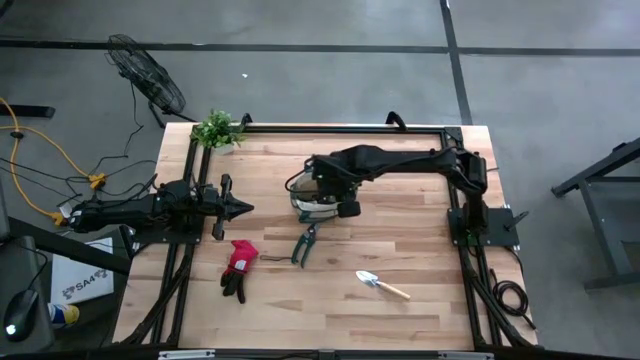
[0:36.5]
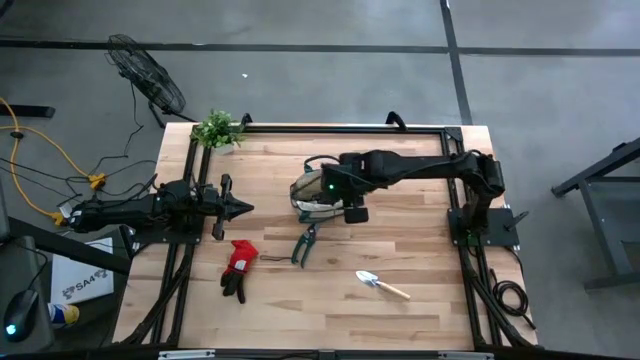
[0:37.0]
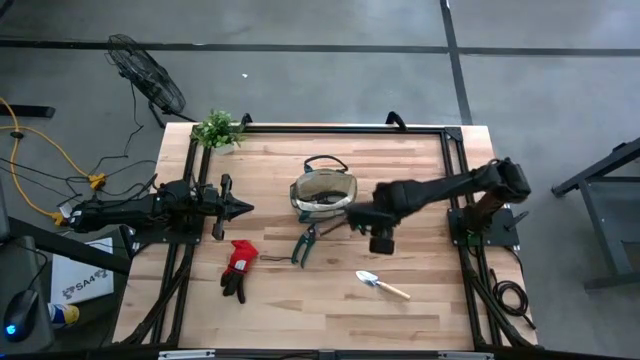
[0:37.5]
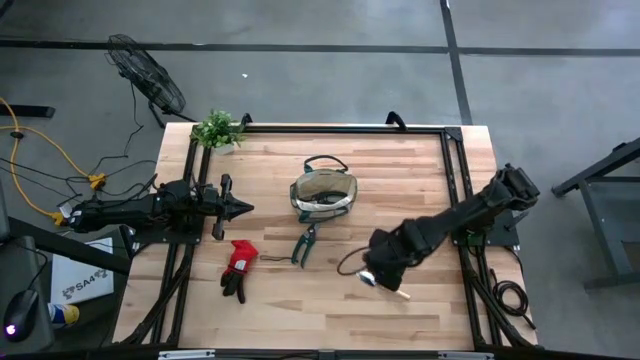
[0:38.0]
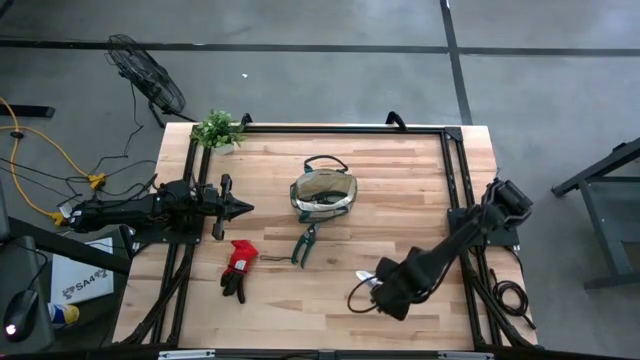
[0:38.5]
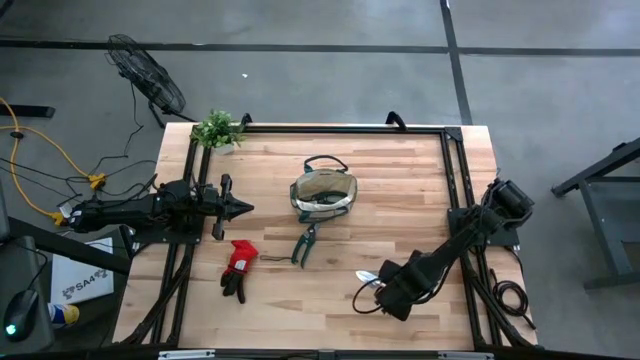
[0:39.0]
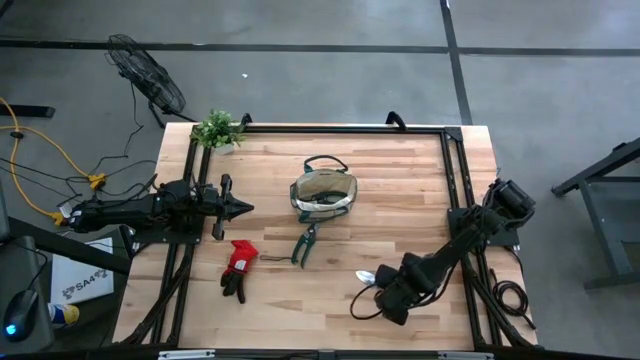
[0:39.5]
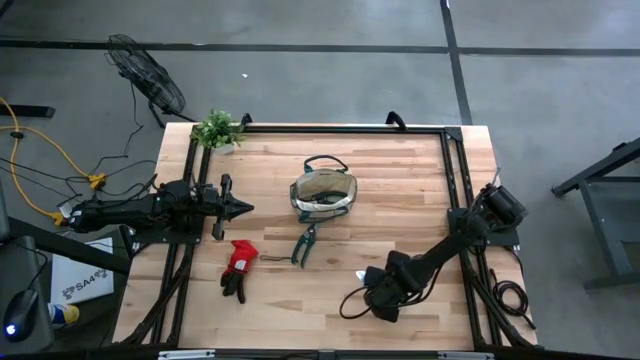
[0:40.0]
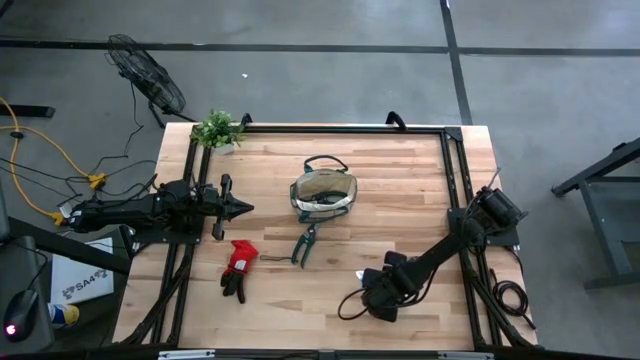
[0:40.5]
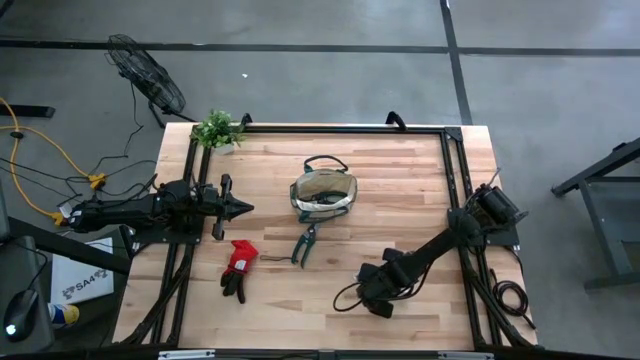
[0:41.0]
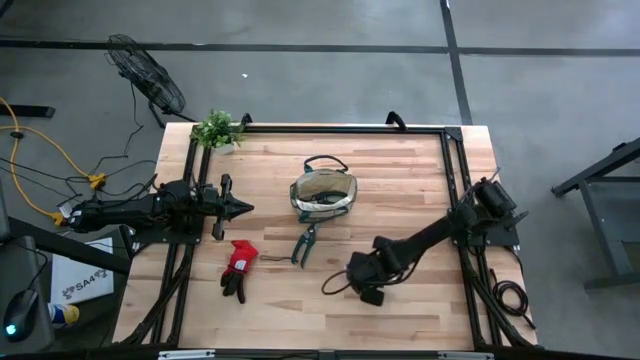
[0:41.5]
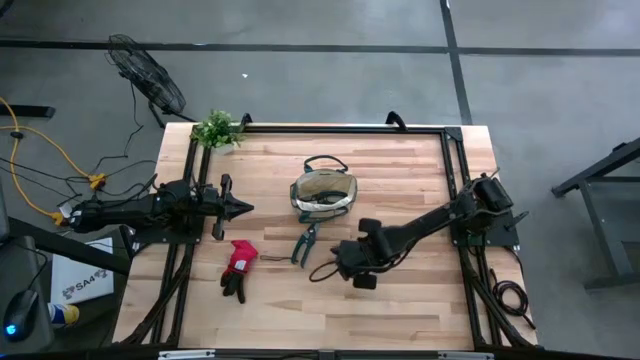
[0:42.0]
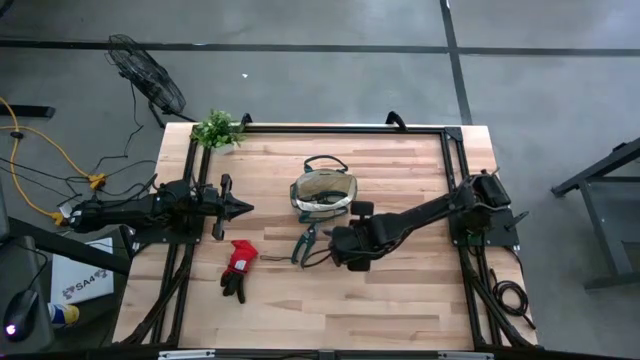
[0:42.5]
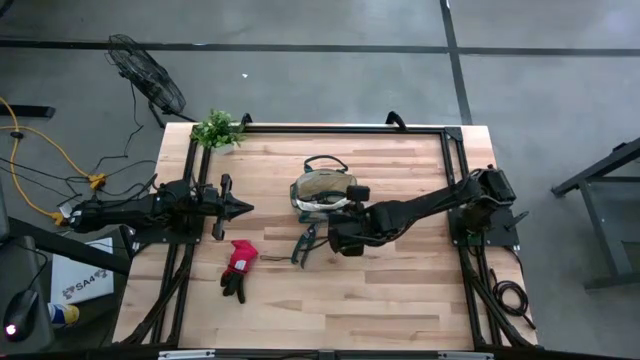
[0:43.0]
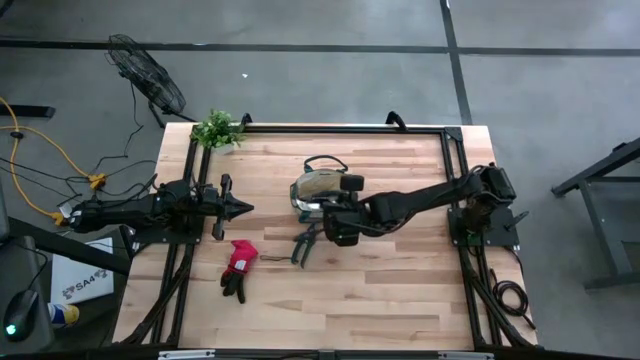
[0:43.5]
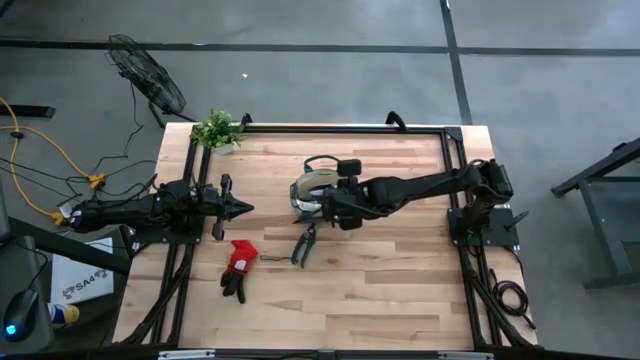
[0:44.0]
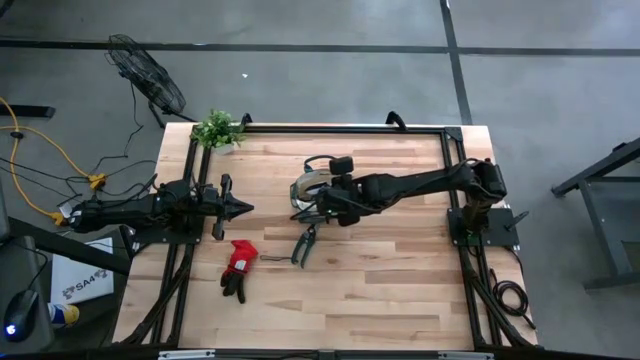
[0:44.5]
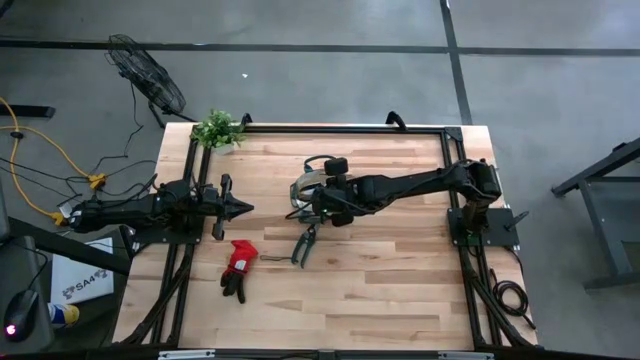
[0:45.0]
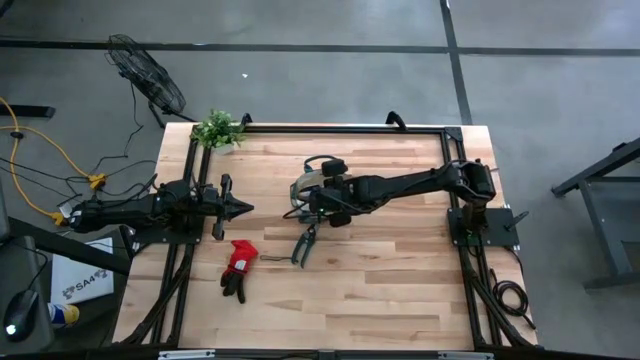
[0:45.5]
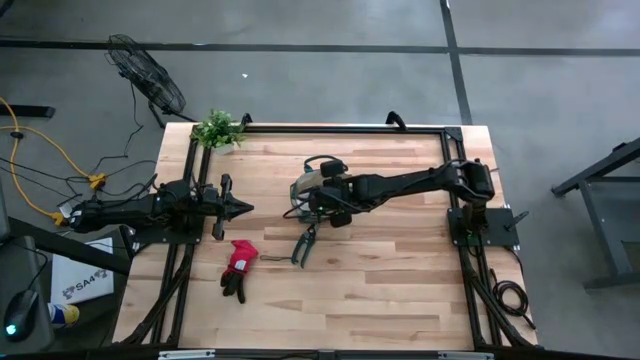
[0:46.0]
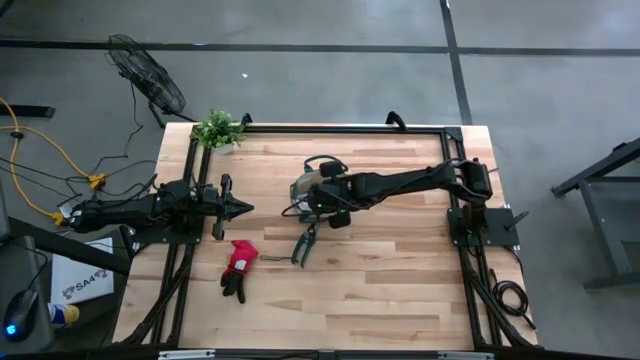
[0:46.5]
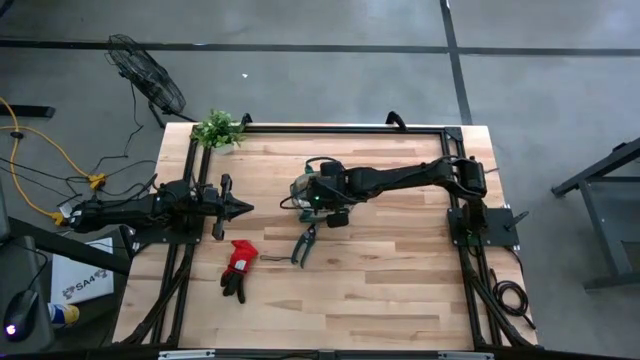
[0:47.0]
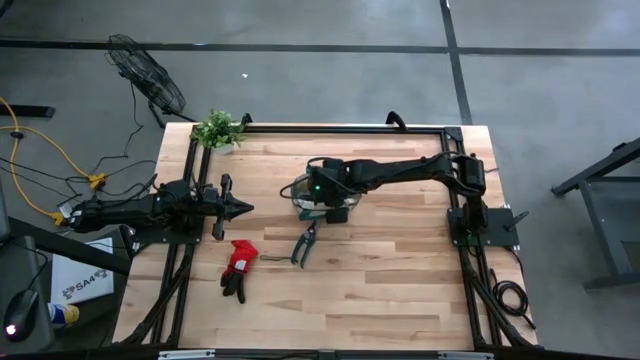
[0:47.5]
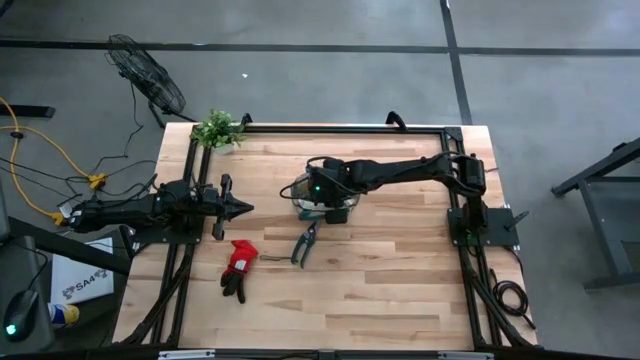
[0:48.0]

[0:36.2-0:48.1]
Task: Pick & Place Garden tools in Gardening bag
Put the brown trowel into the gardening bag

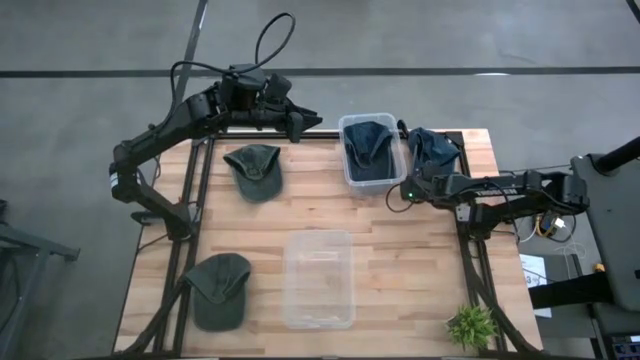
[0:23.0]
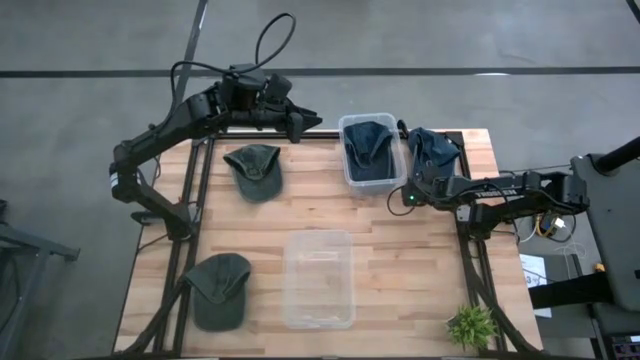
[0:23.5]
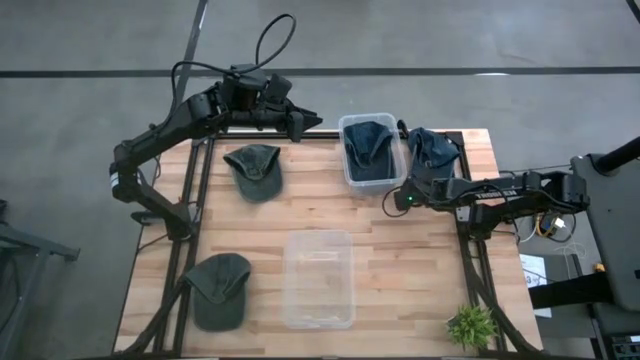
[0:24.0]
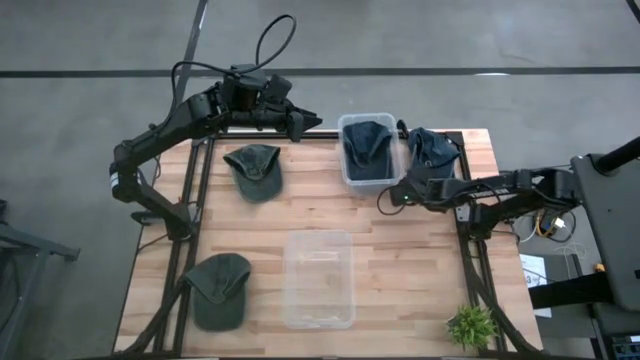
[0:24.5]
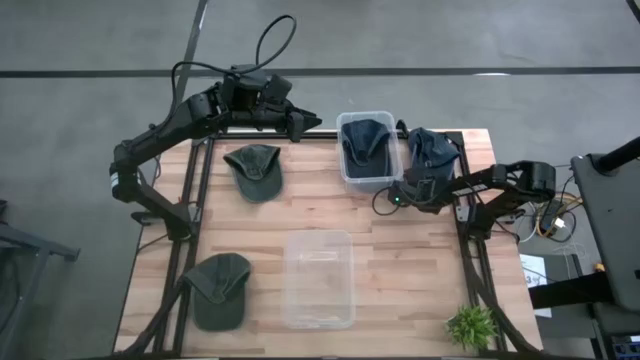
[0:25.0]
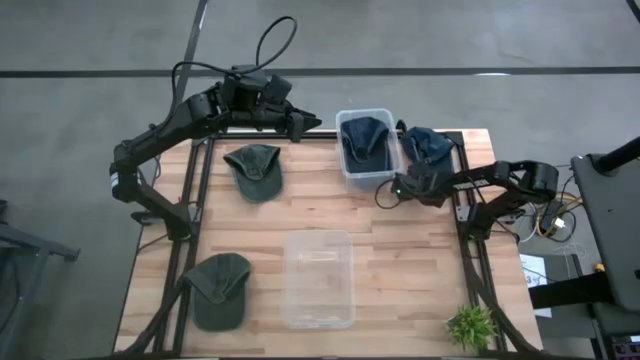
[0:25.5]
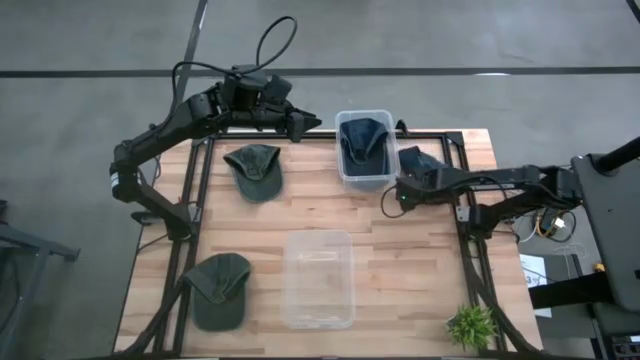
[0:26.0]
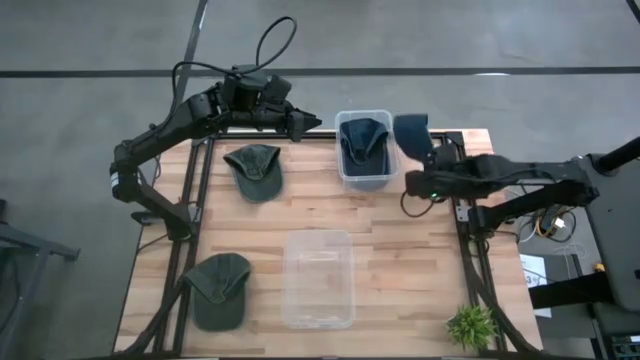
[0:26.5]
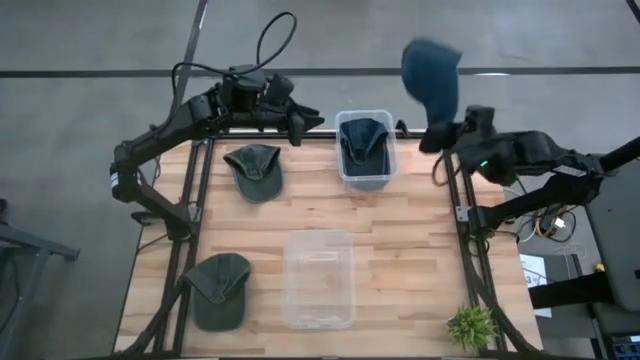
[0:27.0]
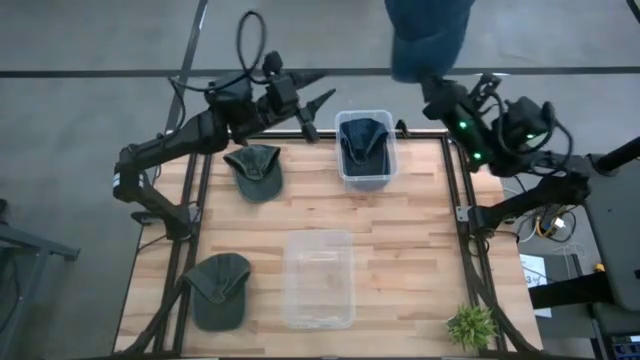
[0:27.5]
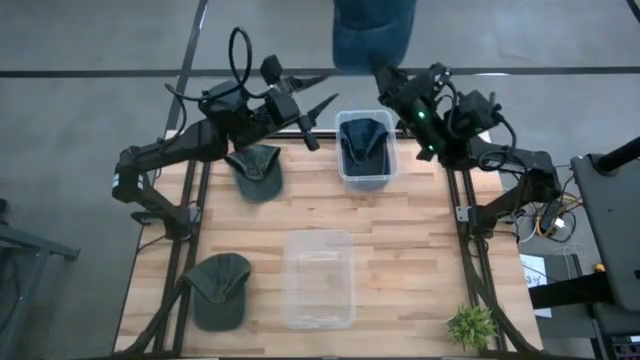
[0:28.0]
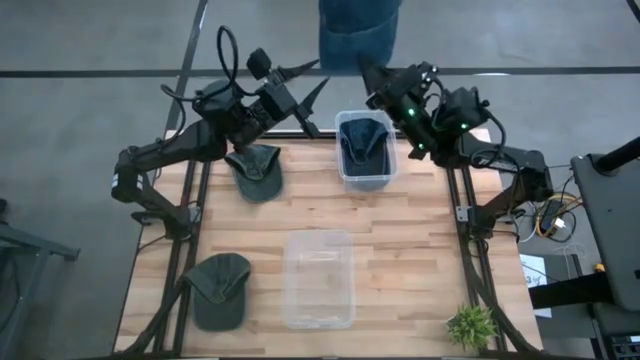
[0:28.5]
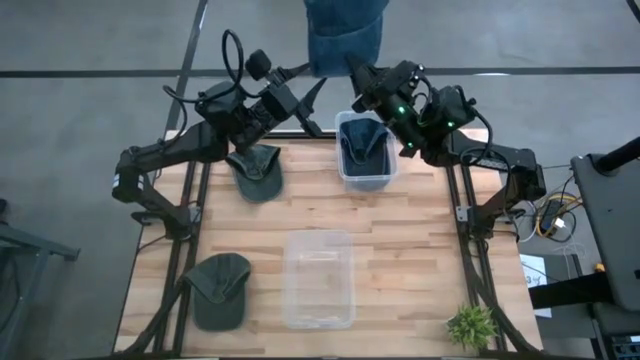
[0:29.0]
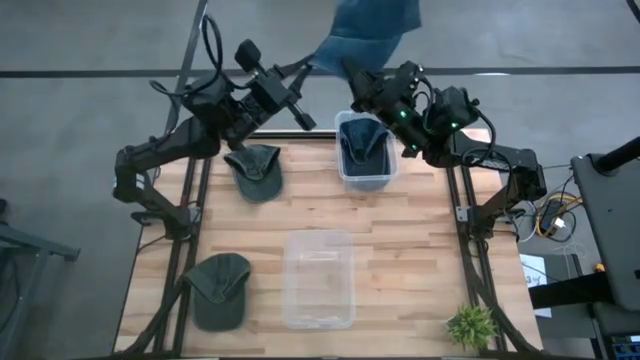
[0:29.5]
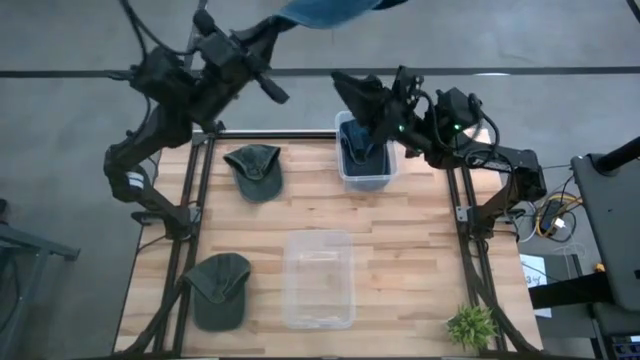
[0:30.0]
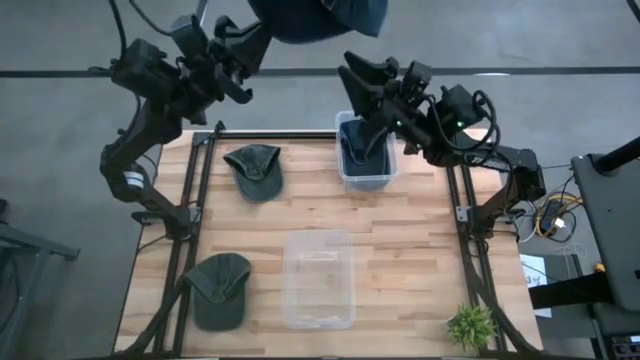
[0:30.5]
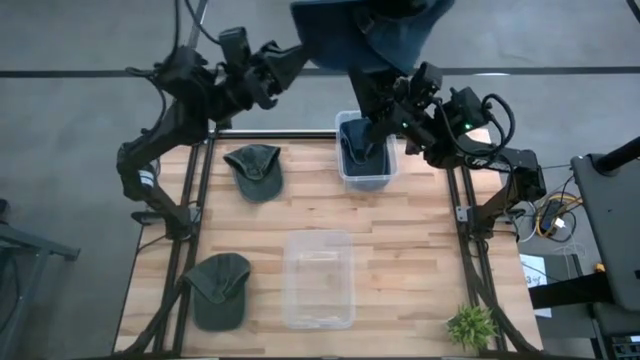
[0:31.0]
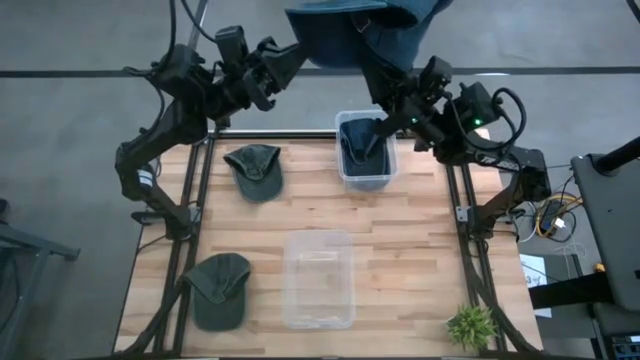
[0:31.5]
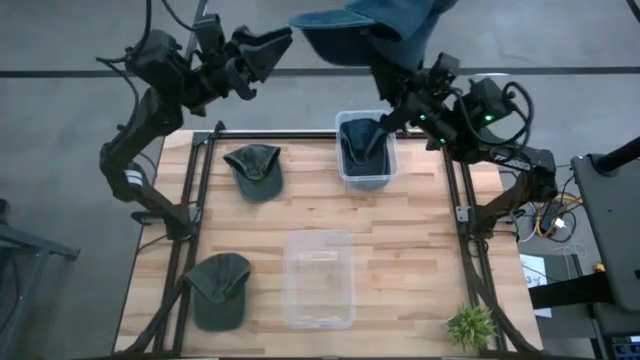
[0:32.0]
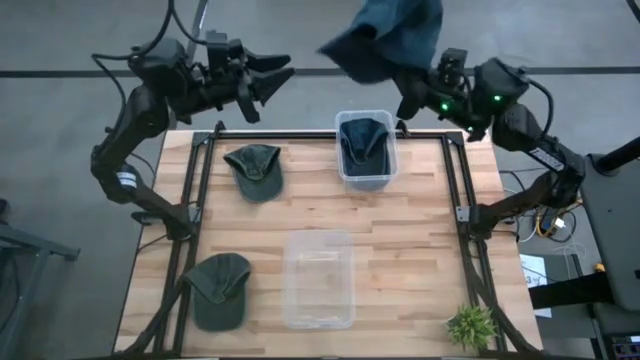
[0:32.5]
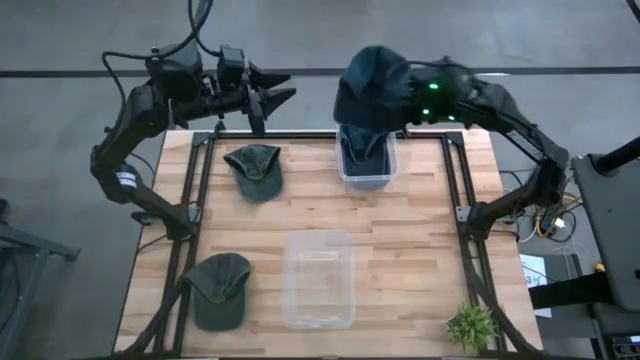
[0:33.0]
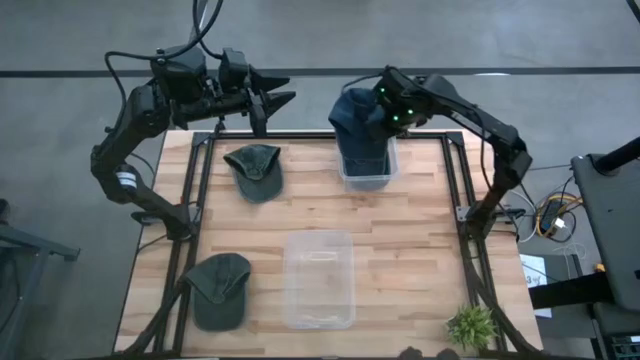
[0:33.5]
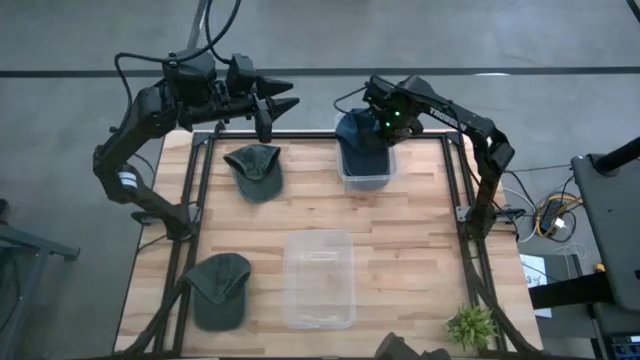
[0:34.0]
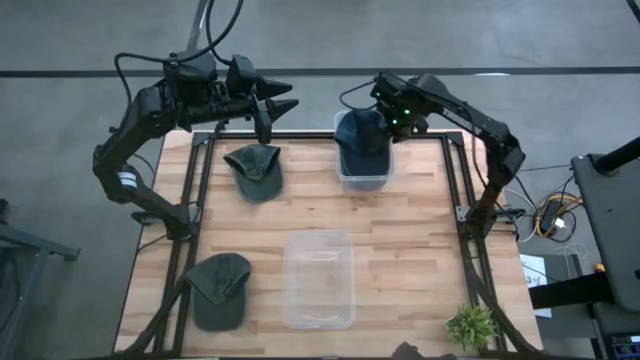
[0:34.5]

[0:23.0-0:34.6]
Task: Pick & Place hat
Put the blue cap into the top transparent bin
